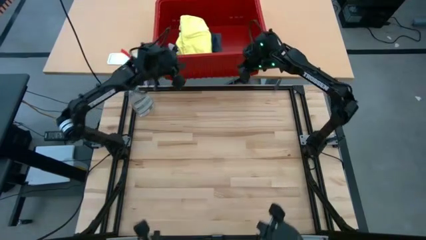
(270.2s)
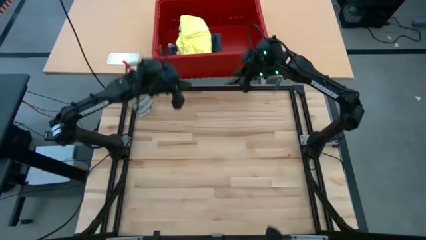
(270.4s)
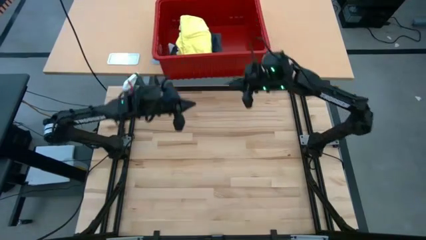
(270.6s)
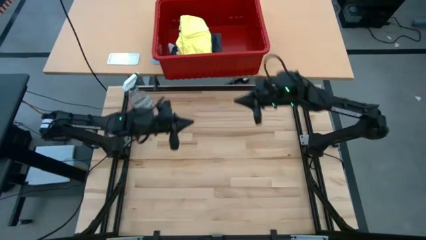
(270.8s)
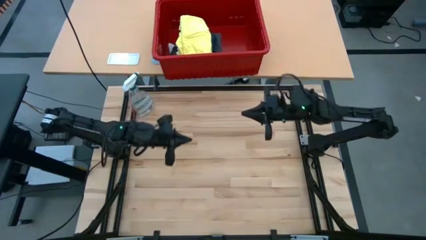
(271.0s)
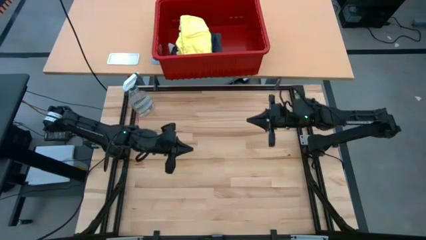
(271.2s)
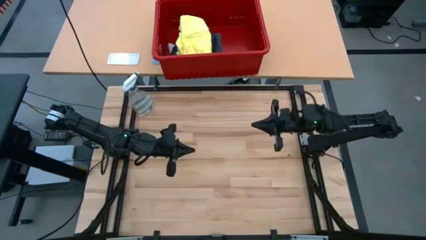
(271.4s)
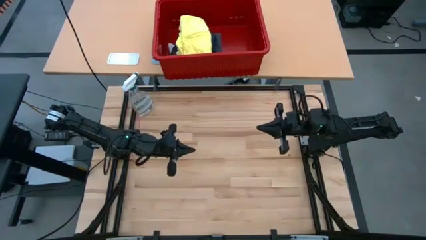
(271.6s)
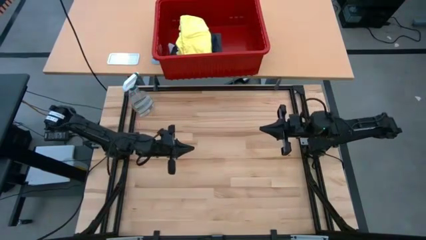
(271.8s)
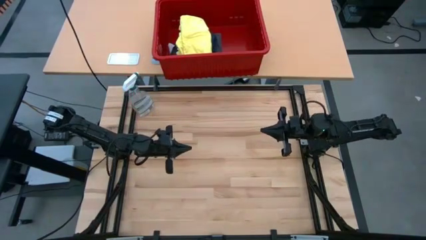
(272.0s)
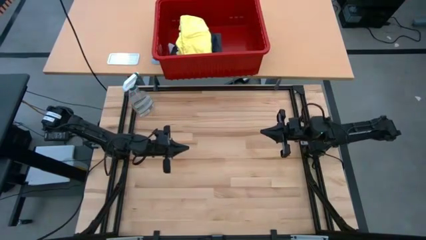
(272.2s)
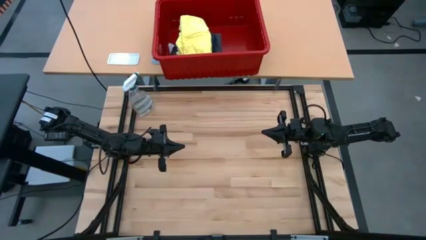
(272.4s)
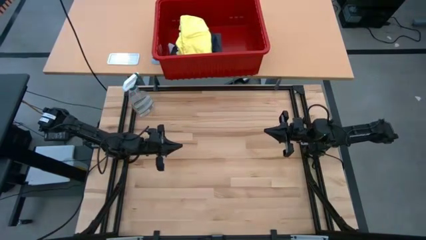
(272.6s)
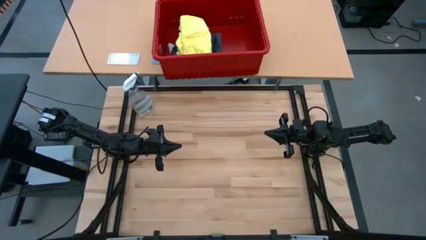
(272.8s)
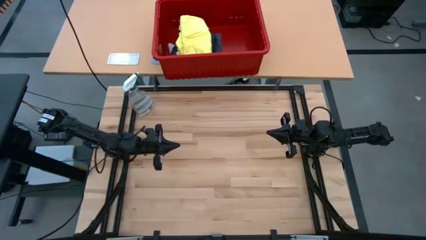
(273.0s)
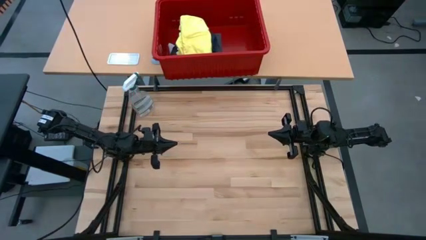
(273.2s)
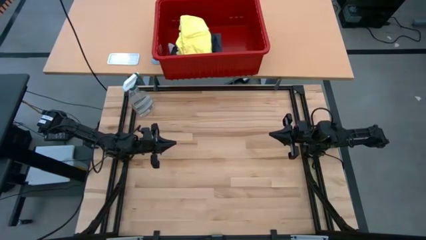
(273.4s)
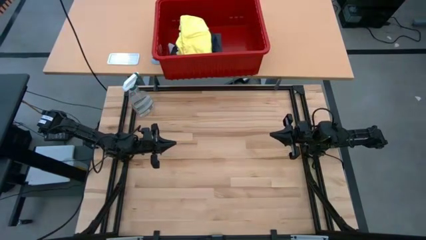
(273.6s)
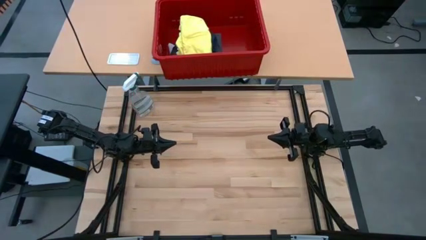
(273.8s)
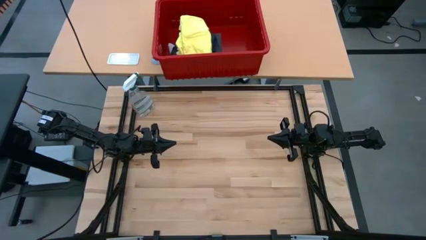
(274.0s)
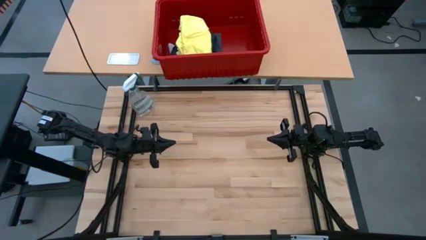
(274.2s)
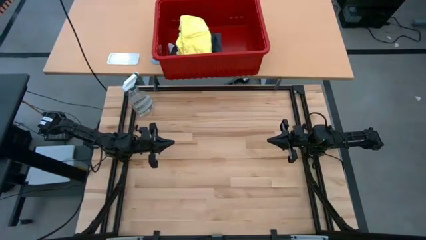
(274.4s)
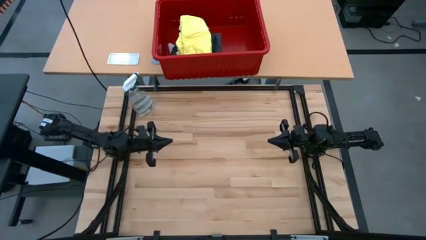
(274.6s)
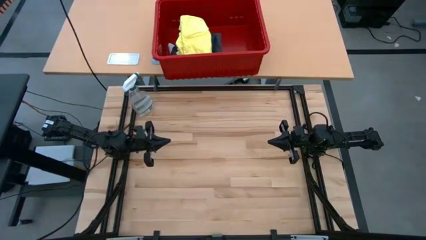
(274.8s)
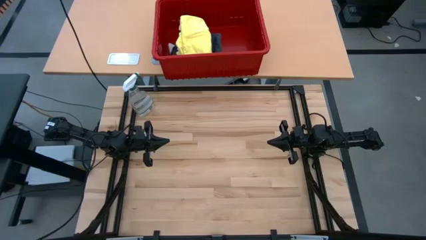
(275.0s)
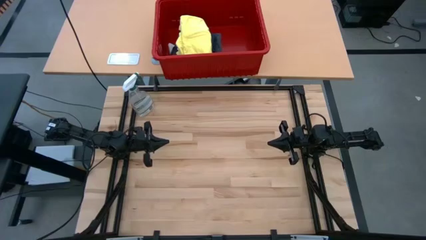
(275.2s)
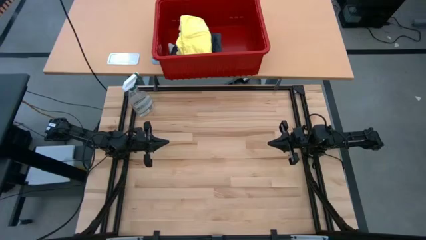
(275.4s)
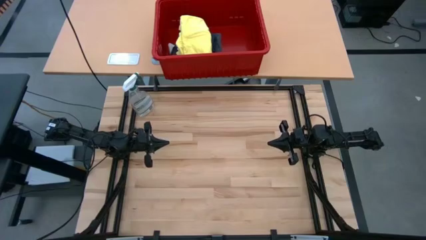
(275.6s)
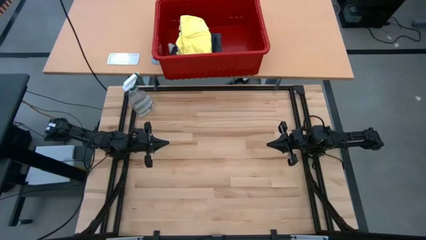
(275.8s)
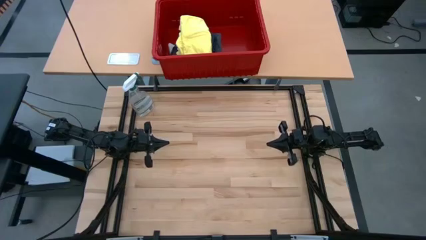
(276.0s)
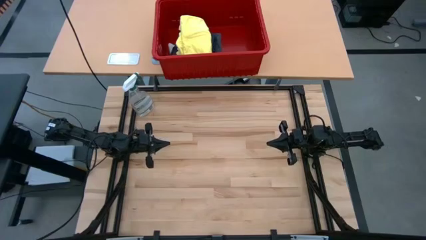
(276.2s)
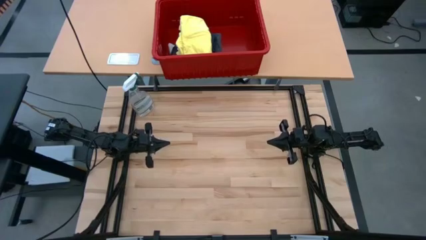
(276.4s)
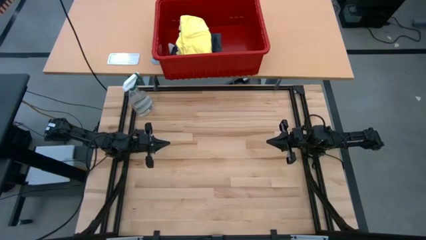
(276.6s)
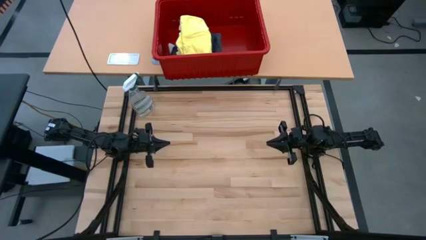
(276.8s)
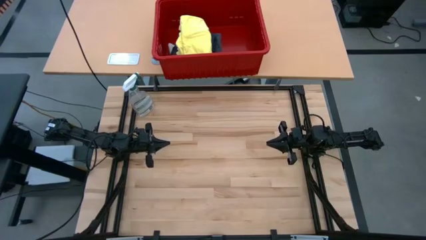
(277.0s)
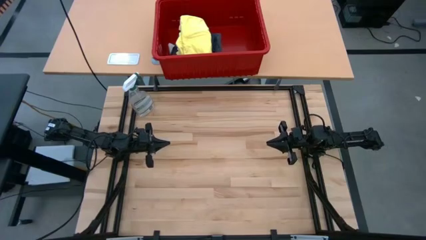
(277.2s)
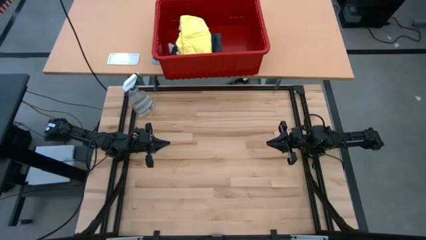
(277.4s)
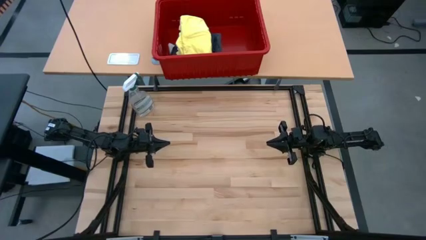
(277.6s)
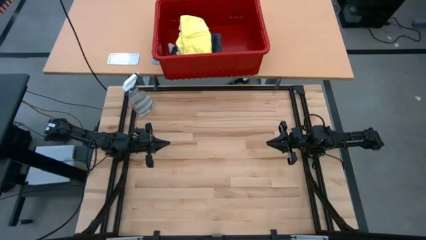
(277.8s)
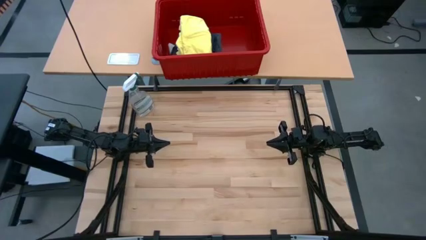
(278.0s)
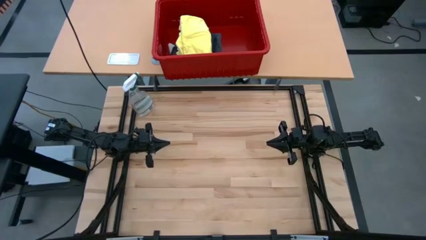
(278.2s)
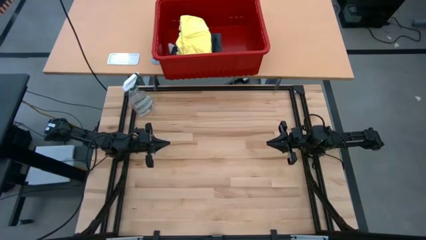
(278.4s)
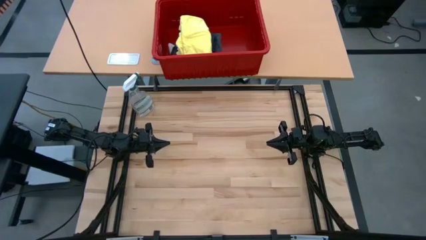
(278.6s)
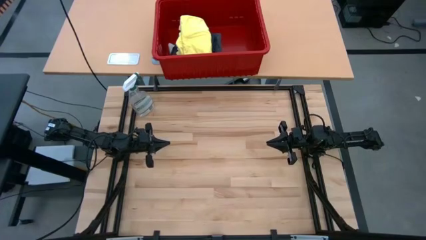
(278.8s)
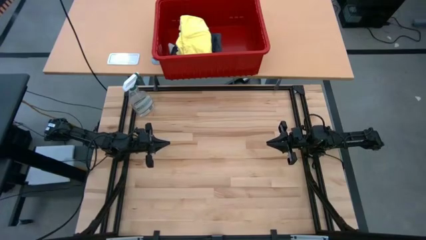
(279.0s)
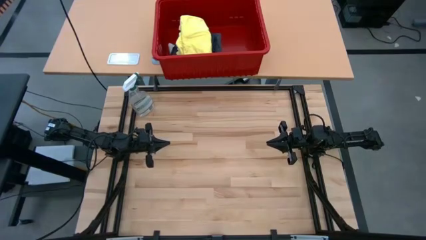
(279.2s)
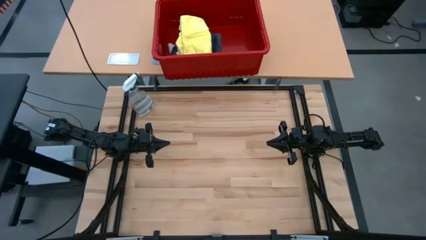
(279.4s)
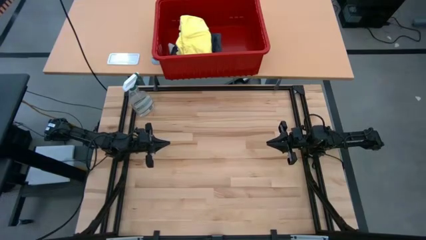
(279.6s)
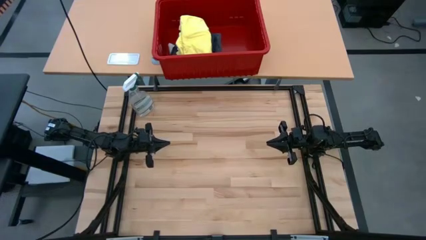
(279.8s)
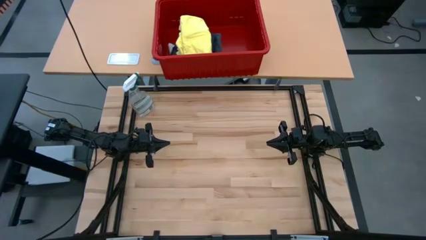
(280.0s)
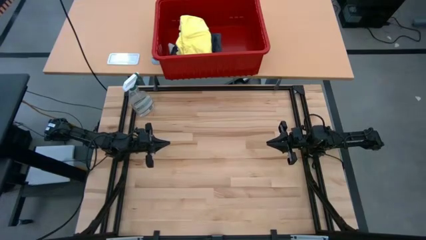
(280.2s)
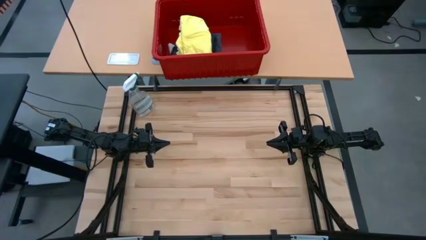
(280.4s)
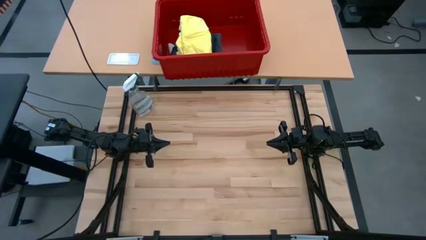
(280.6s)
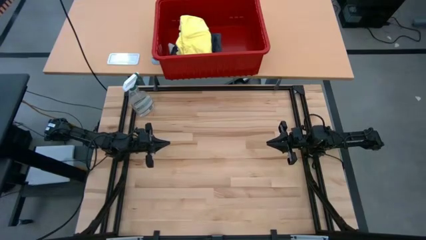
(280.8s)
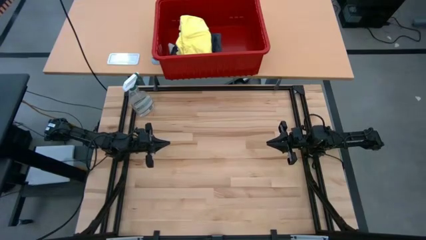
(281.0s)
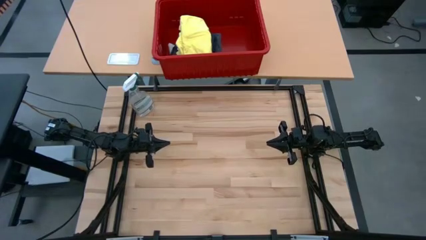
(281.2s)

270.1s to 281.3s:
Task: Fold laundry
Return to Home Position
